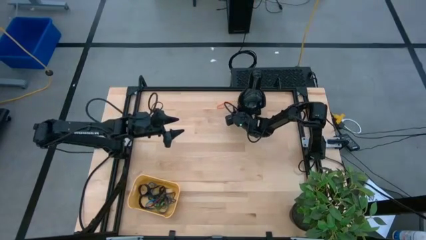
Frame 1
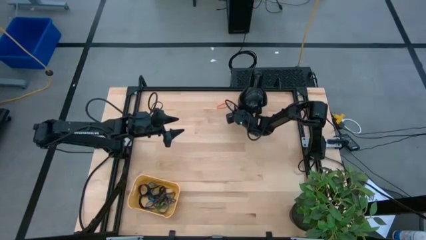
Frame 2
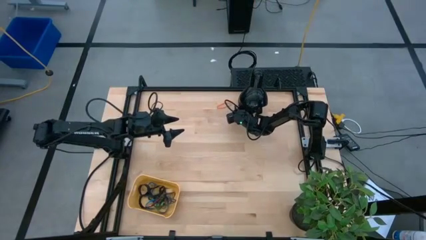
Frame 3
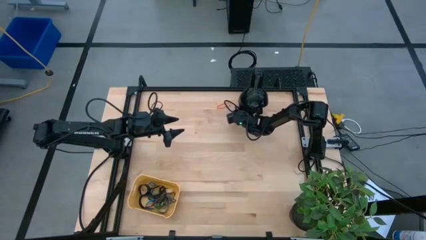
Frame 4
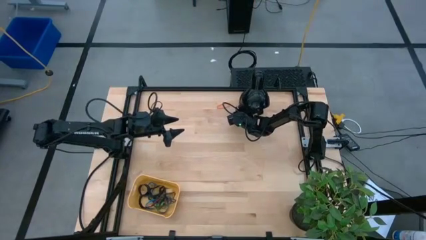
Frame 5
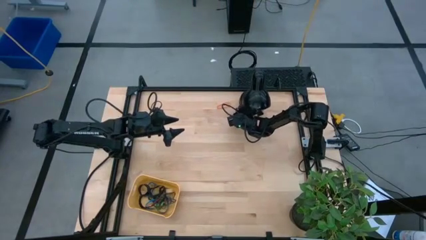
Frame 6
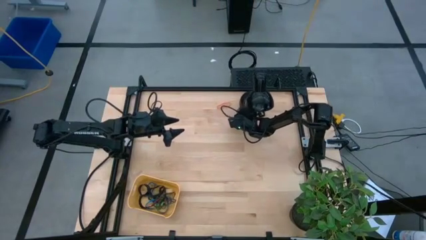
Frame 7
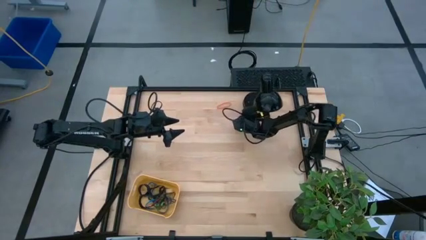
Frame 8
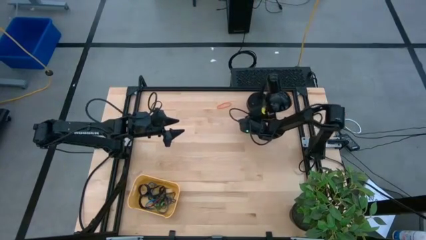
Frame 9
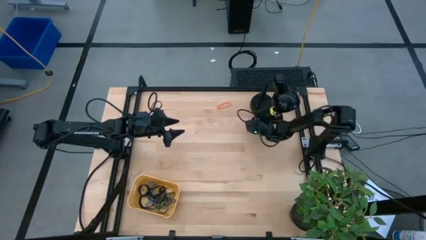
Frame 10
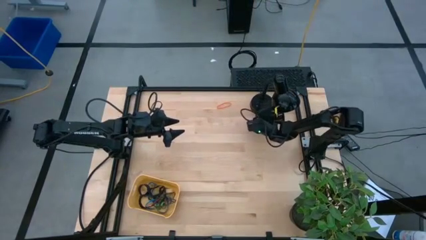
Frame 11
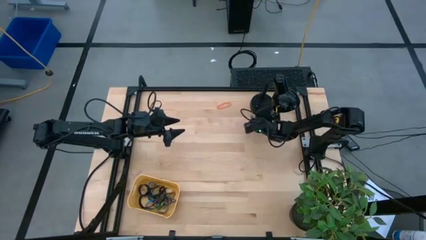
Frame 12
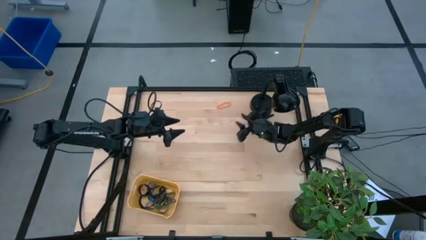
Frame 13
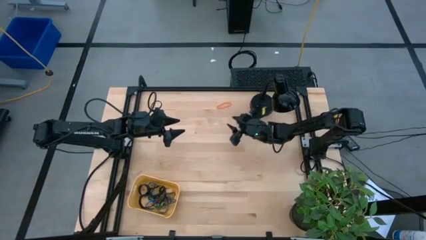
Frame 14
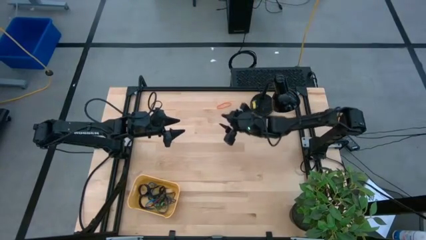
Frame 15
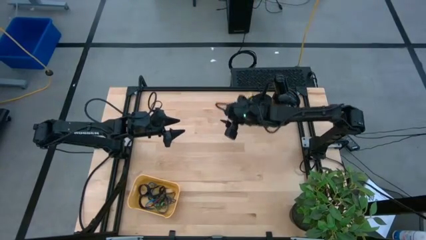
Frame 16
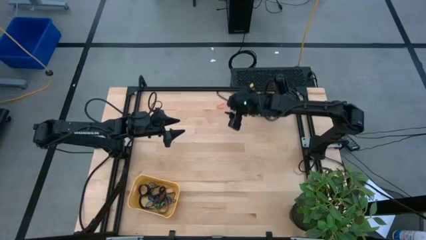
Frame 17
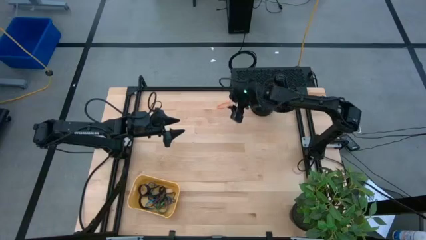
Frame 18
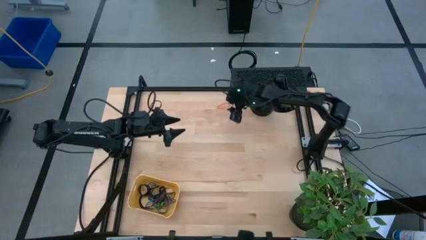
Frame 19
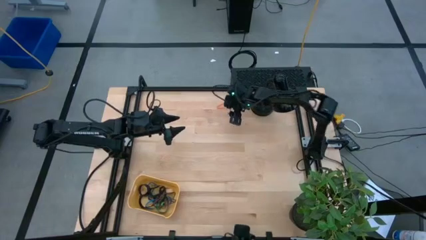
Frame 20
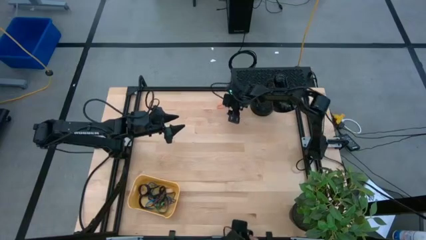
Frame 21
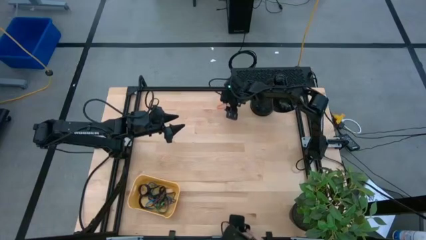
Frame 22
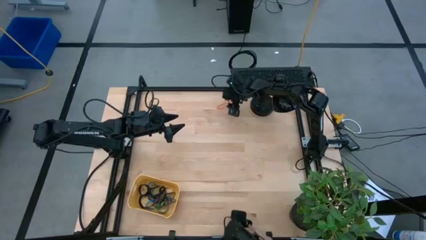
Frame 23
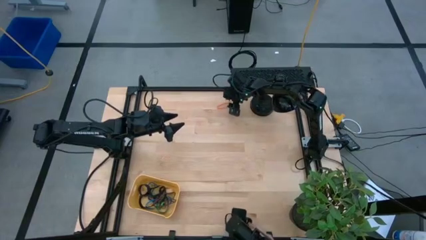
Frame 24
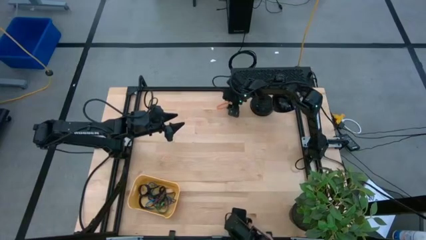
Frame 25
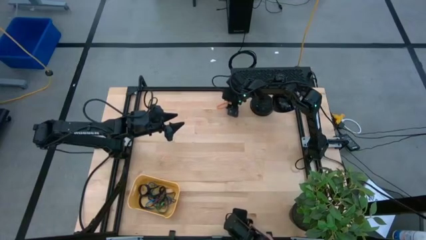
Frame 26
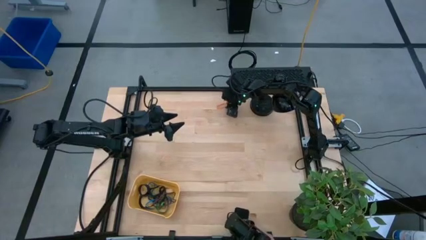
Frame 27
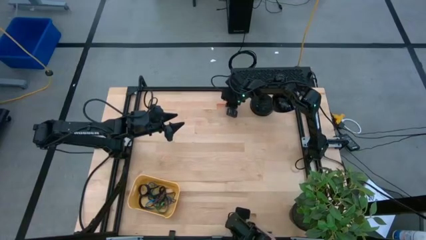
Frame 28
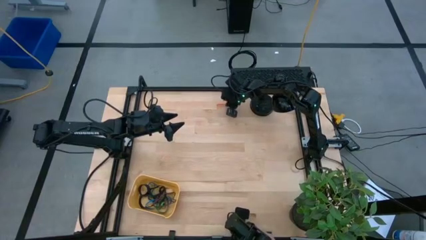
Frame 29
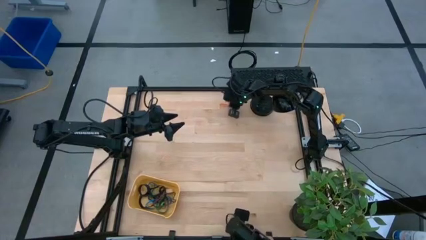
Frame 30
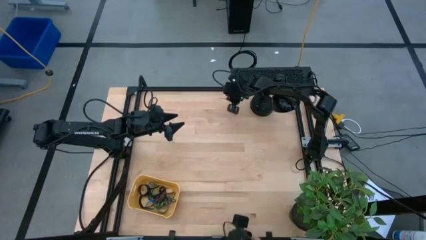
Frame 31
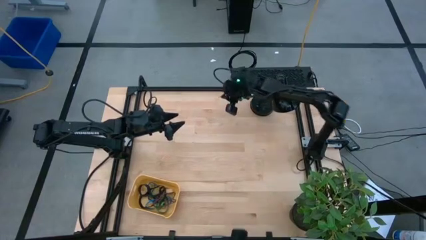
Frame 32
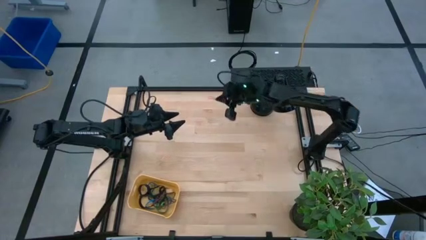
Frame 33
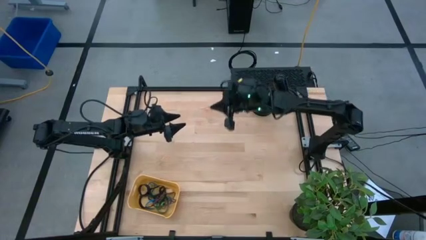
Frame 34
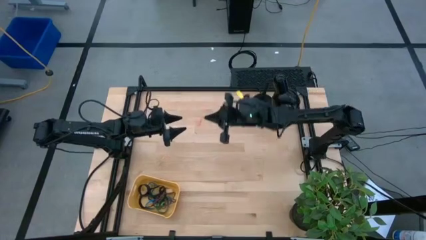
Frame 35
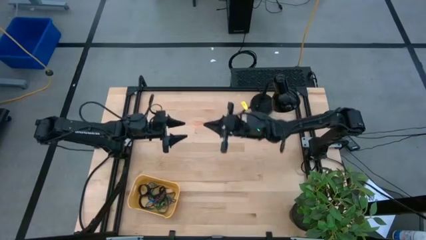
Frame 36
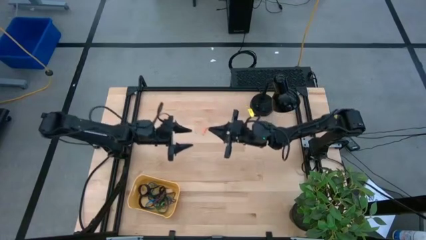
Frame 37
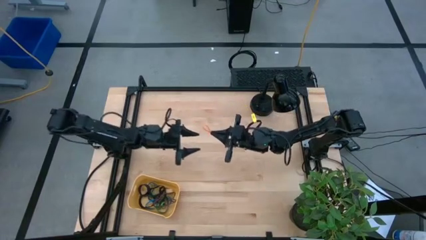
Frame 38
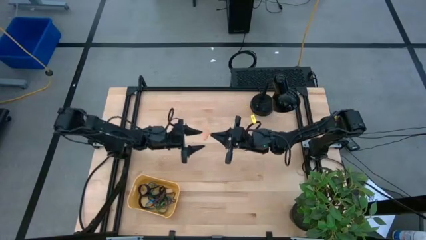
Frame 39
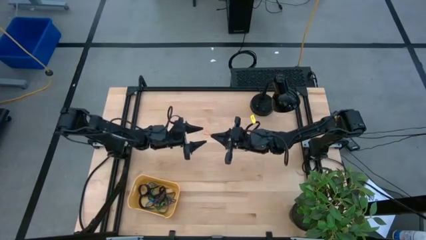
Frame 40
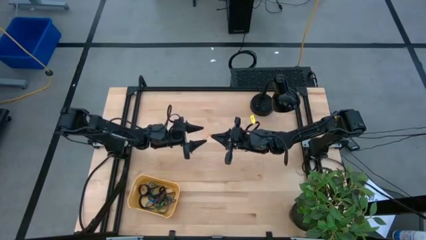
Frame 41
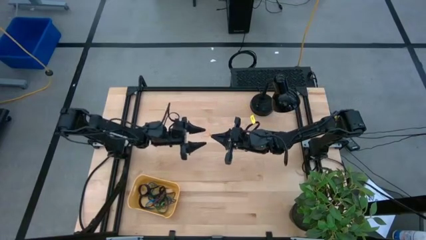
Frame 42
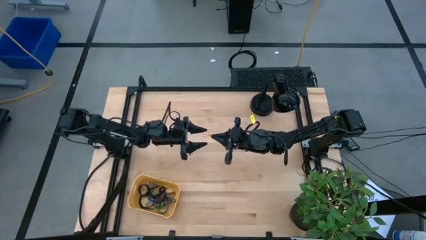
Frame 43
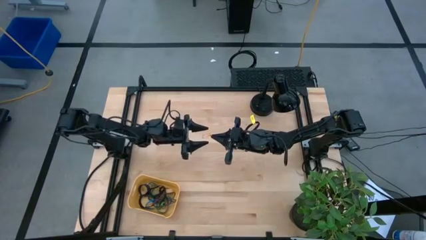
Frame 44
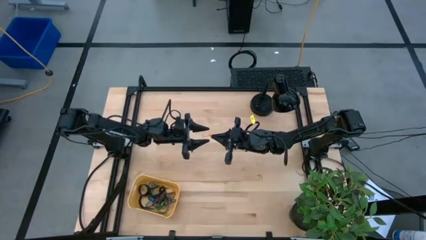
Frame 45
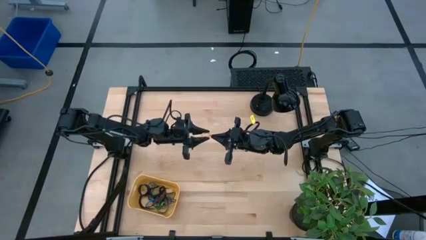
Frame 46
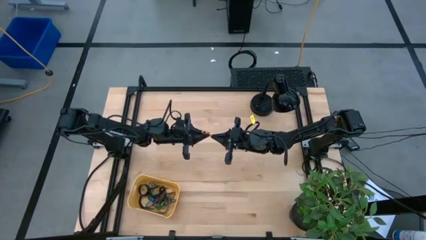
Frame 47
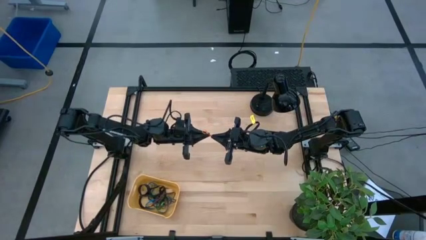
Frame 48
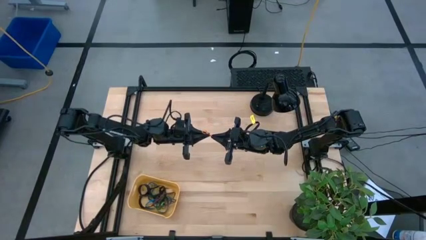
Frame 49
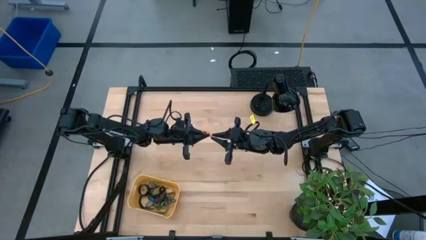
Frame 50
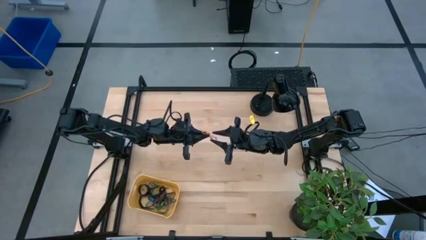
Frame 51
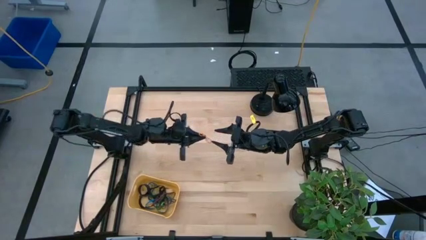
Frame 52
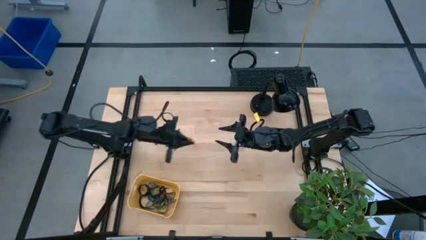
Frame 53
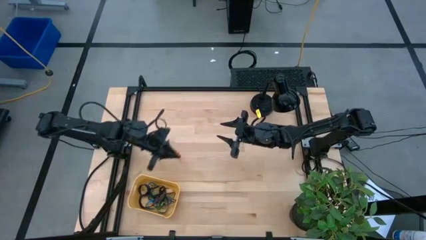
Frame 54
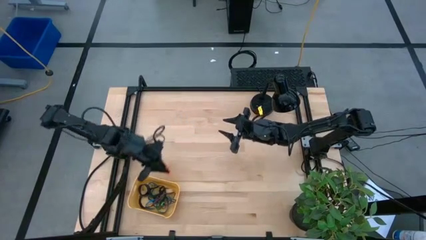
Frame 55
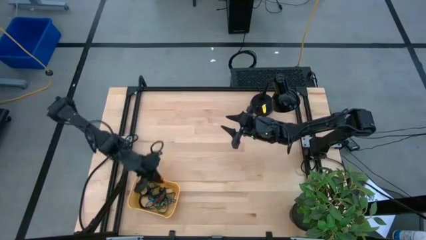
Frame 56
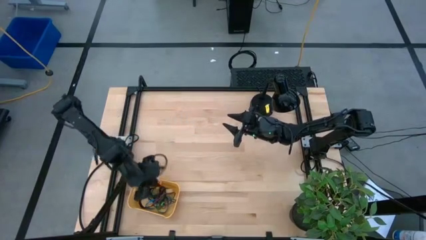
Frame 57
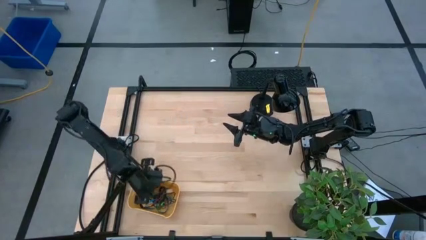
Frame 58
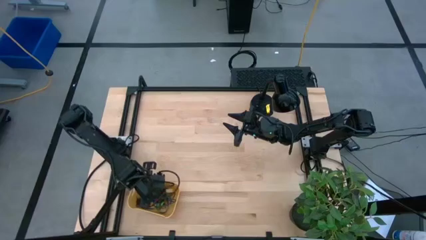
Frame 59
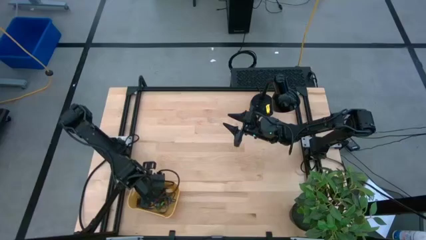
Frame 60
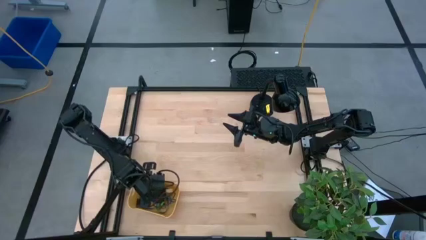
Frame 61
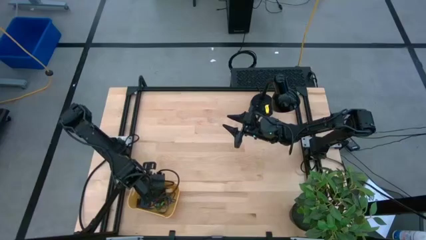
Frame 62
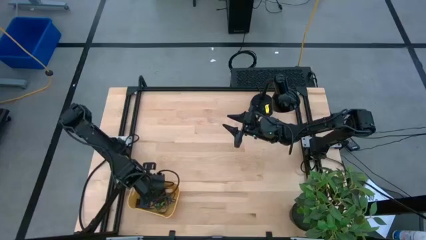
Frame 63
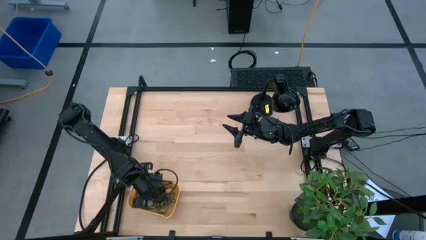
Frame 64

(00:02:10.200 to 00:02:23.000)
Task: Pick and place rubber bands into bin
Put the orange rubberband into the yellow bin

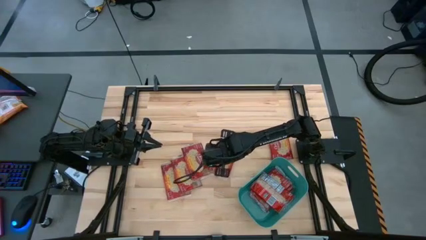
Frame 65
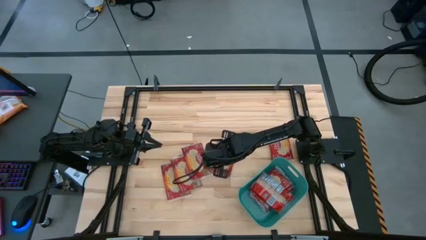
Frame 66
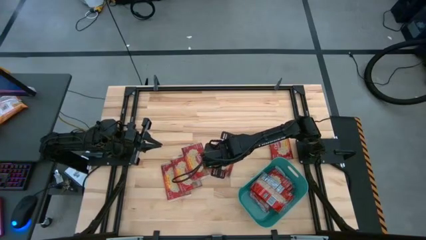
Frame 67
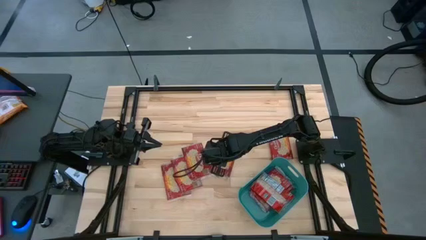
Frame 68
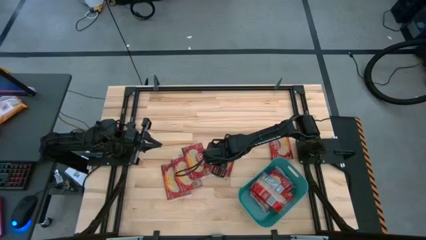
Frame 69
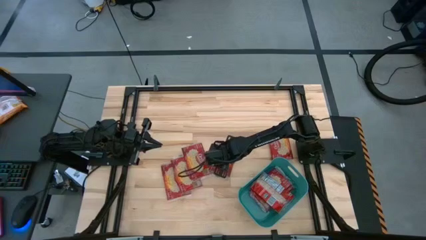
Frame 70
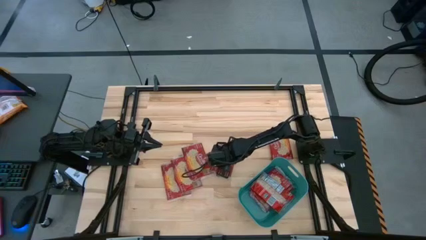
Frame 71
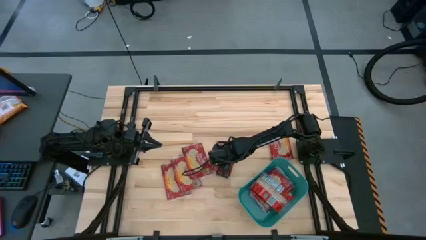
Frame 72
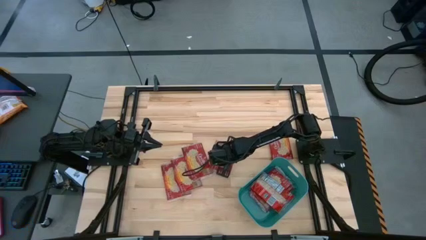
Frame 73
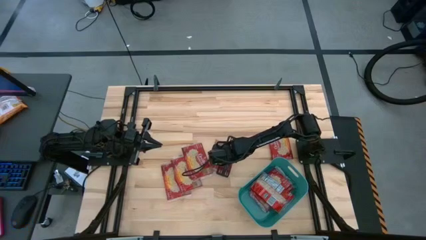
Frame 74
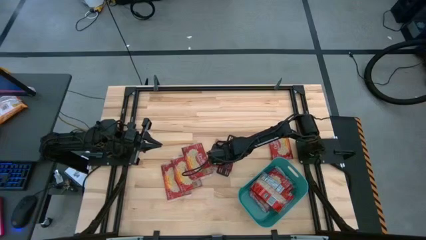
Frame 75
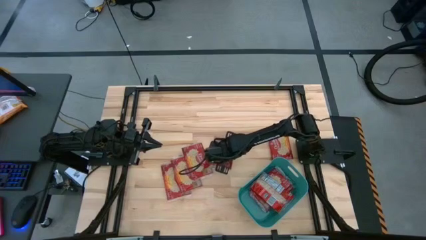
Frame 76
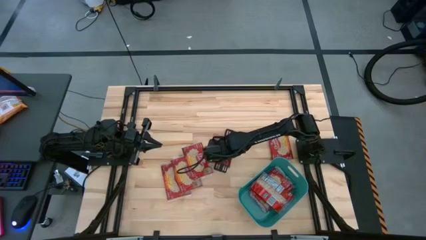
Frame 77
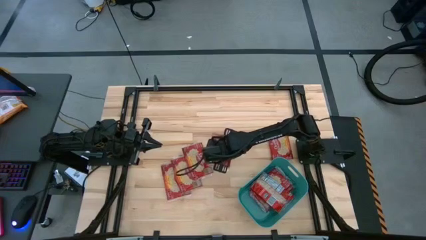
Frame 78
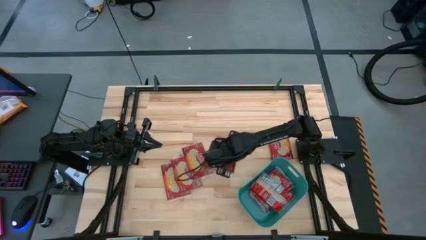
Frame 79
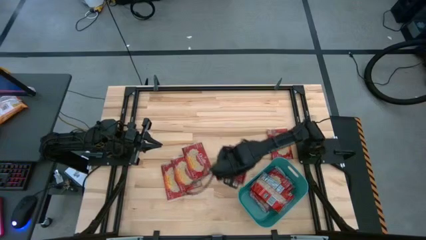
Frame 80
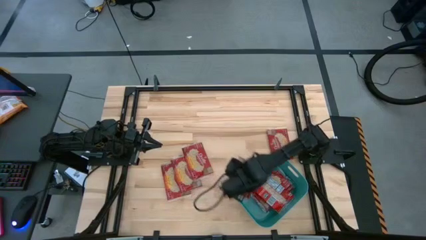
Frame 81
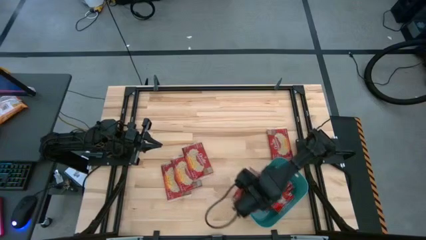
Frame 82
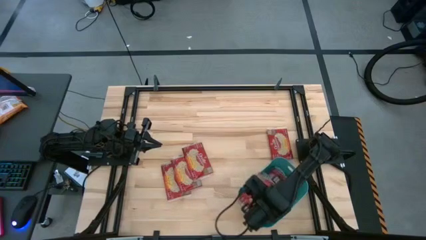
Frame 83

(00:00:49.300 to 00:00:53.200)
Task: Sort popcorn bags into baskets
Put the red popcorn into the green bin
